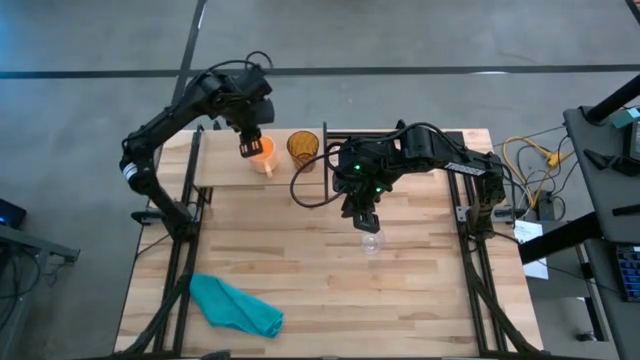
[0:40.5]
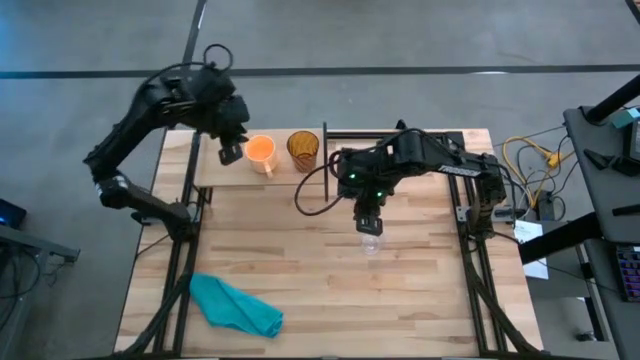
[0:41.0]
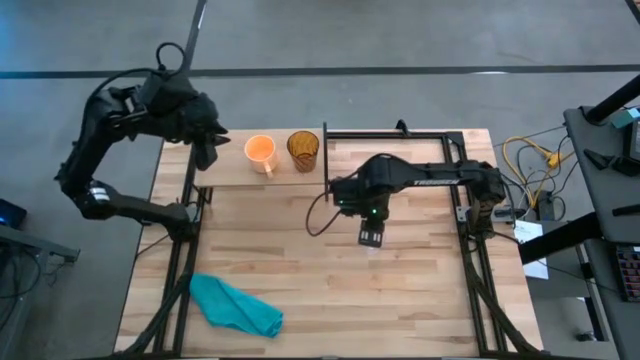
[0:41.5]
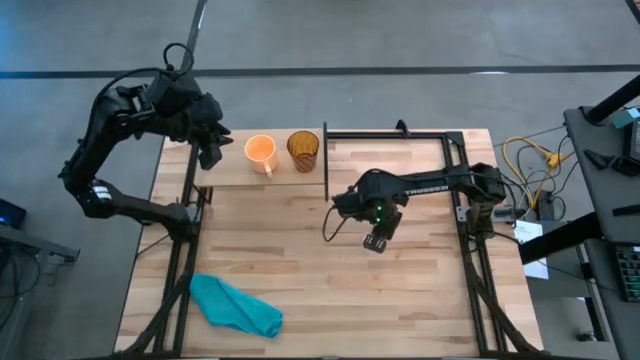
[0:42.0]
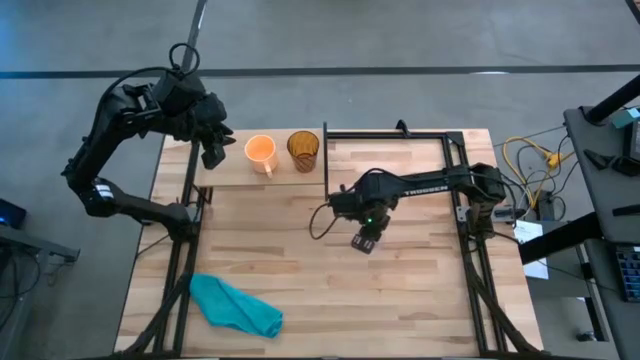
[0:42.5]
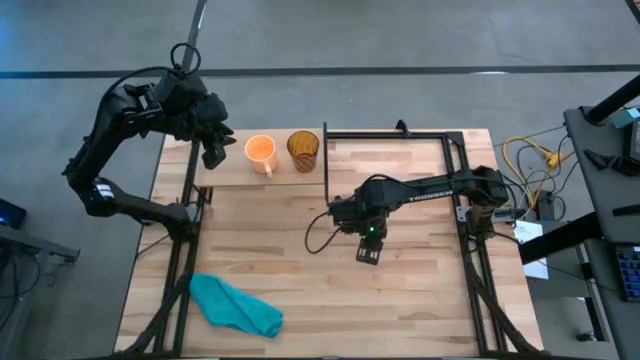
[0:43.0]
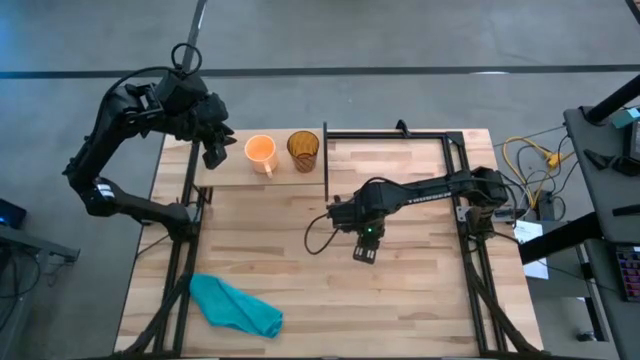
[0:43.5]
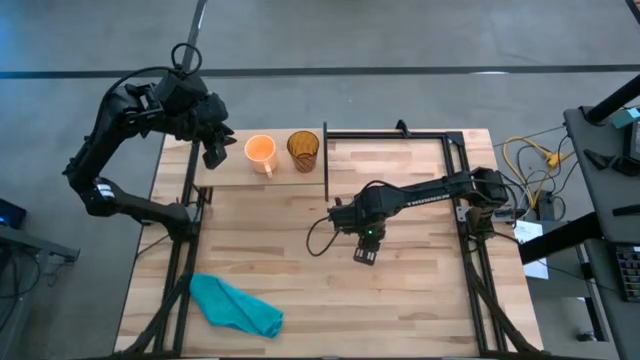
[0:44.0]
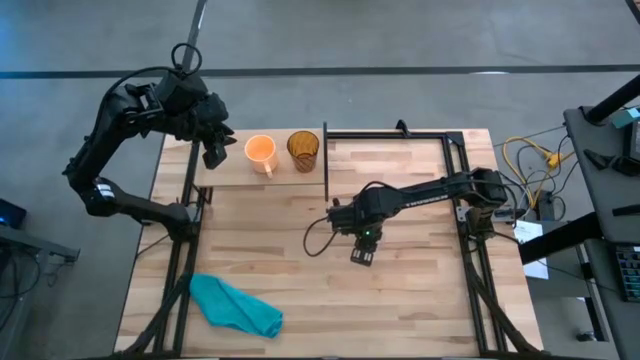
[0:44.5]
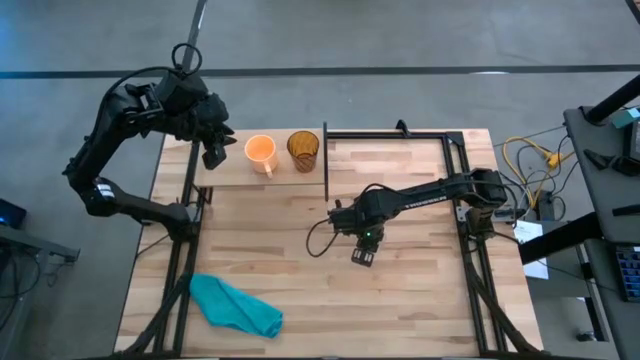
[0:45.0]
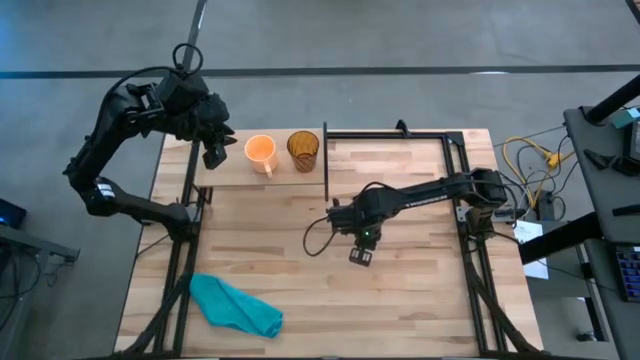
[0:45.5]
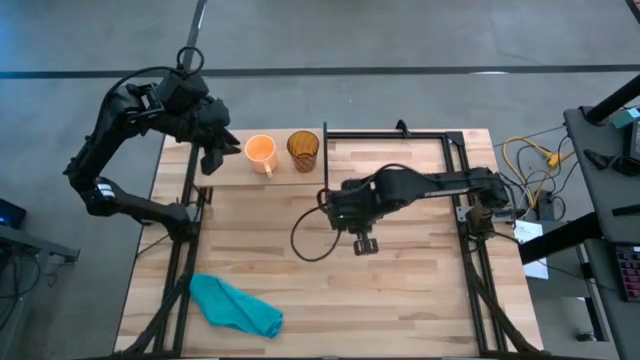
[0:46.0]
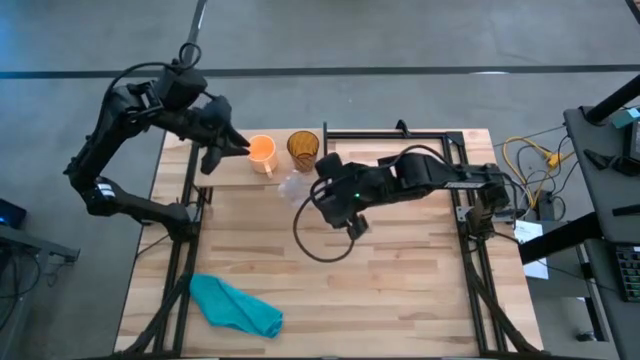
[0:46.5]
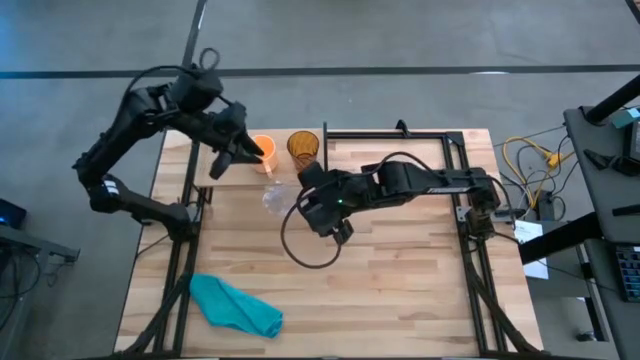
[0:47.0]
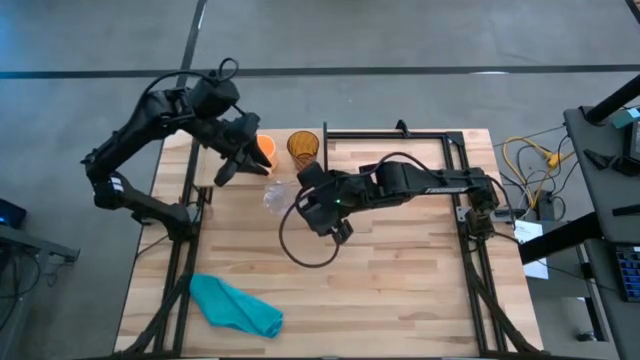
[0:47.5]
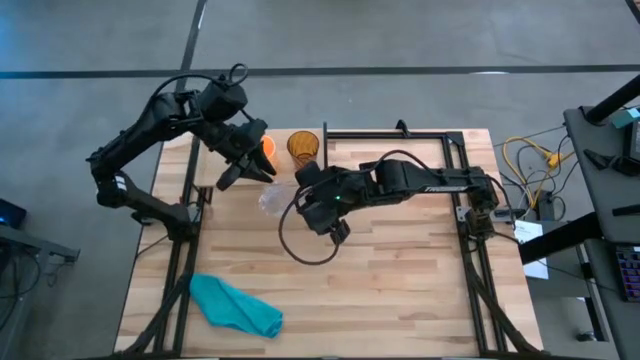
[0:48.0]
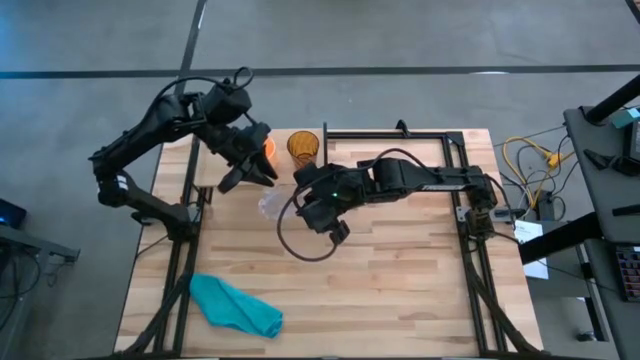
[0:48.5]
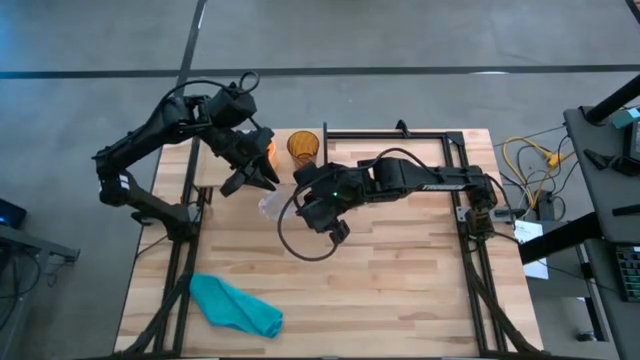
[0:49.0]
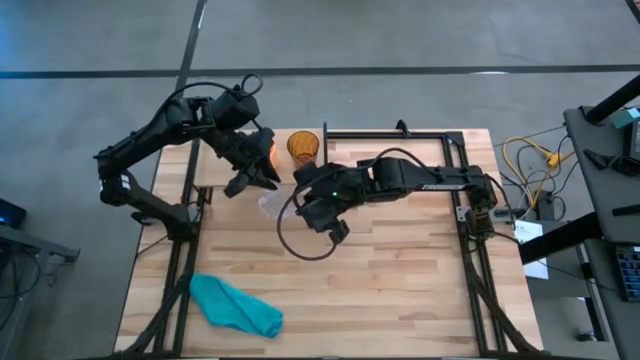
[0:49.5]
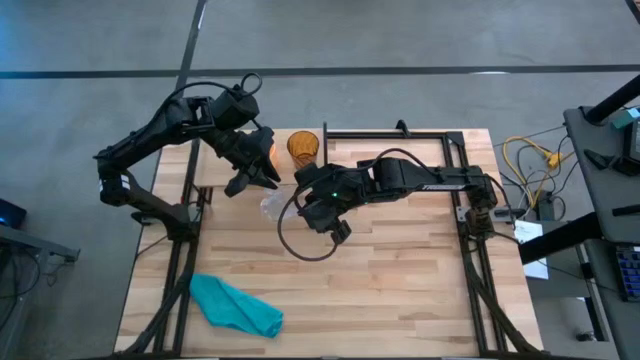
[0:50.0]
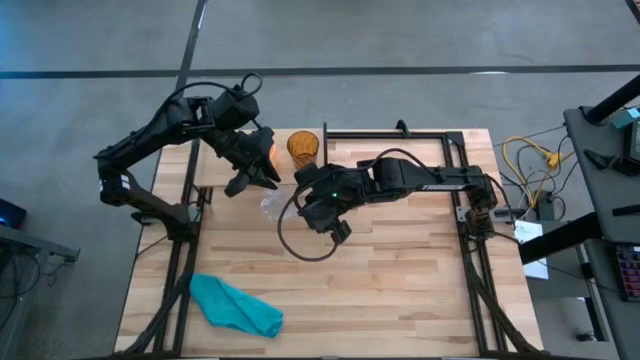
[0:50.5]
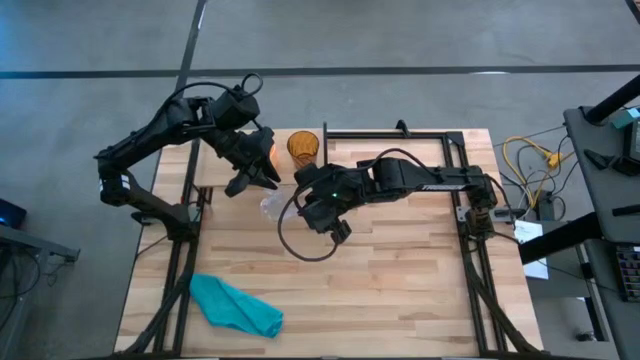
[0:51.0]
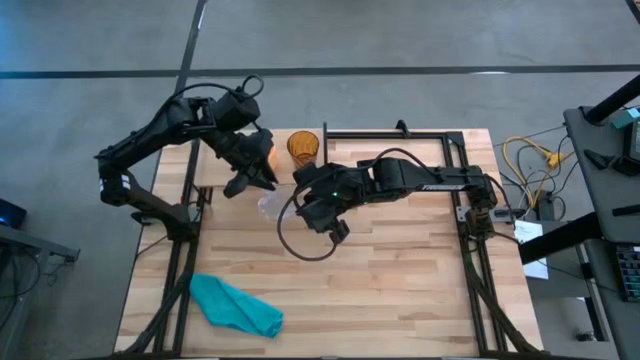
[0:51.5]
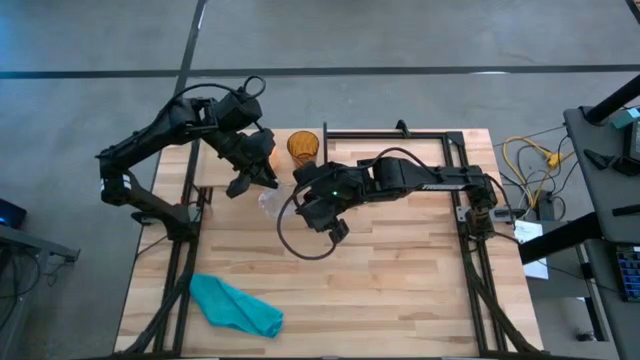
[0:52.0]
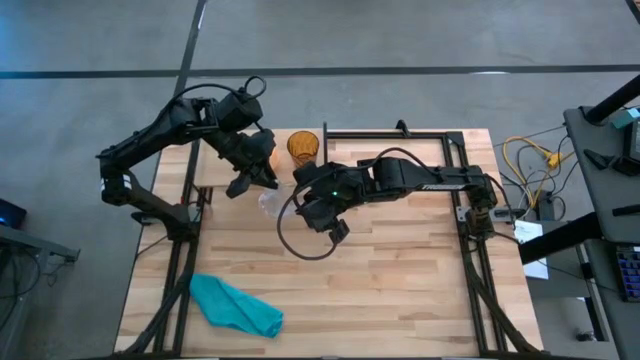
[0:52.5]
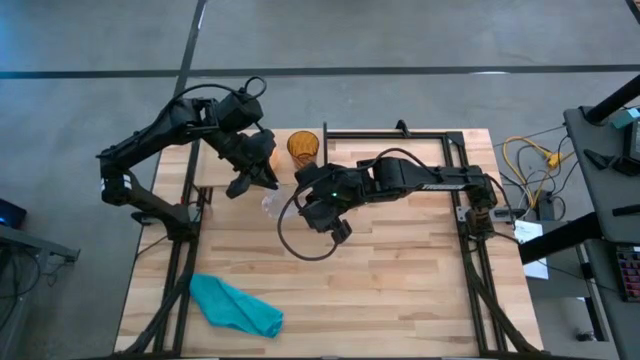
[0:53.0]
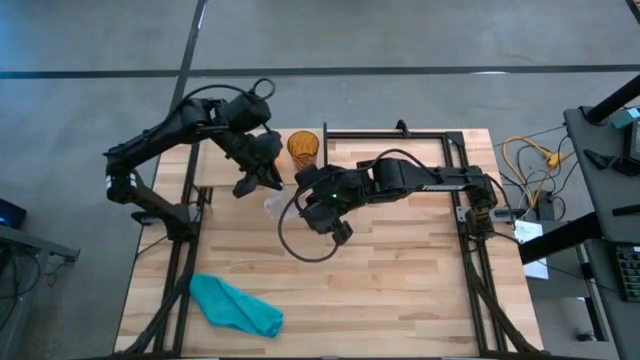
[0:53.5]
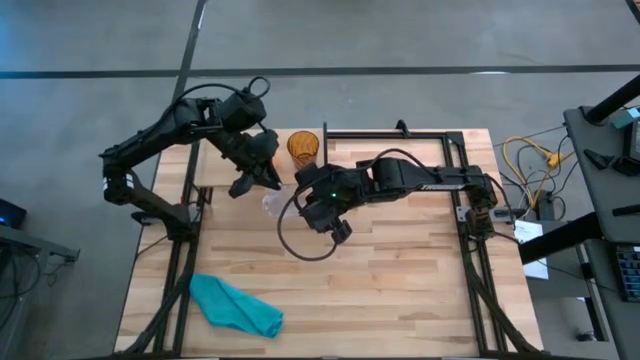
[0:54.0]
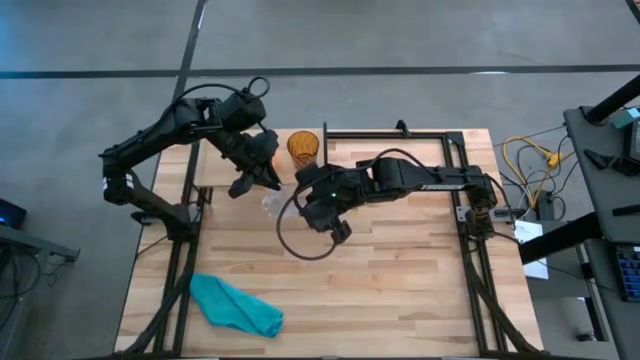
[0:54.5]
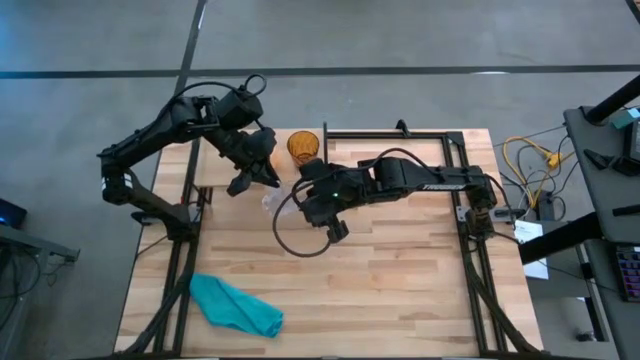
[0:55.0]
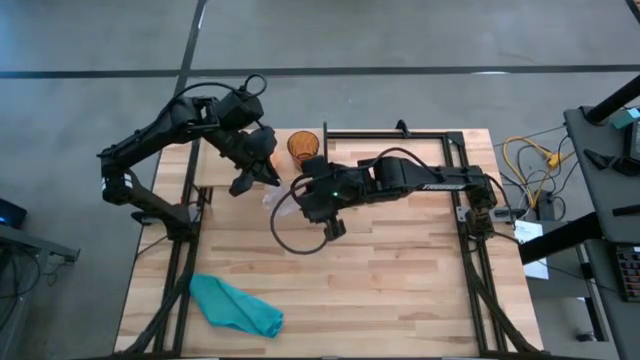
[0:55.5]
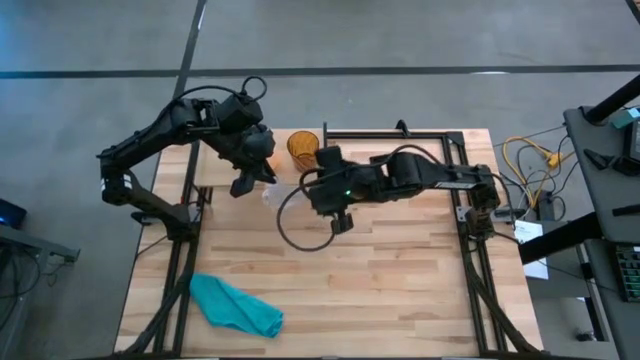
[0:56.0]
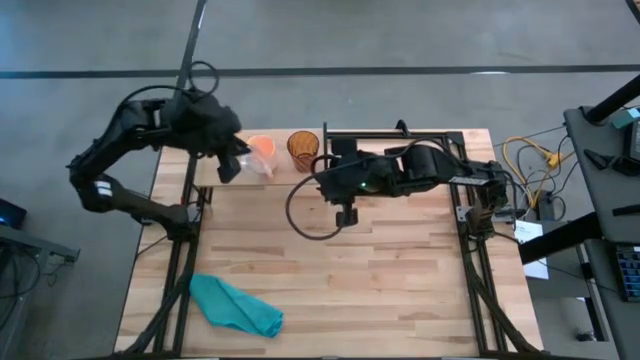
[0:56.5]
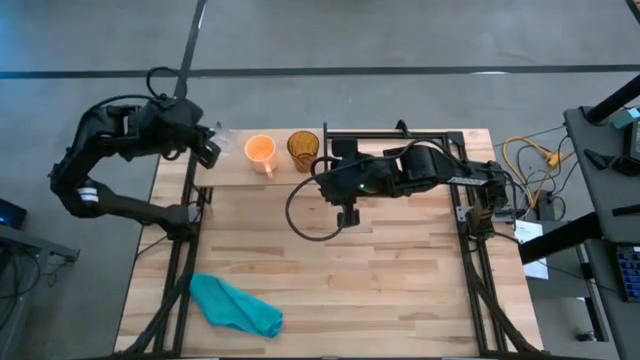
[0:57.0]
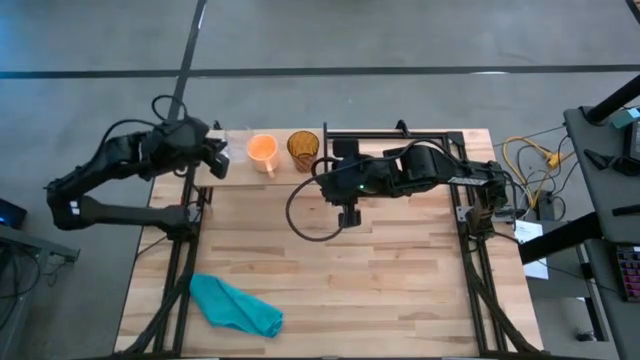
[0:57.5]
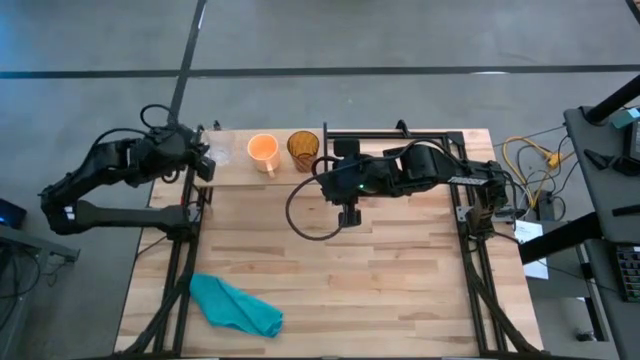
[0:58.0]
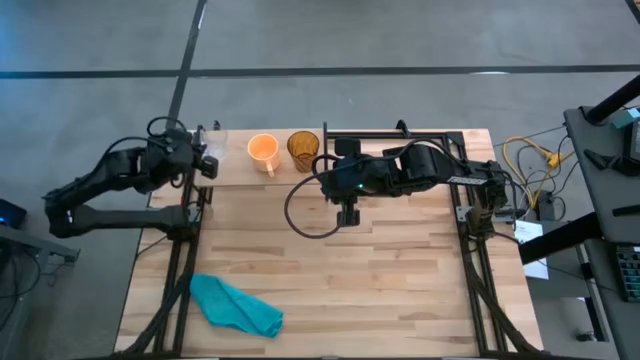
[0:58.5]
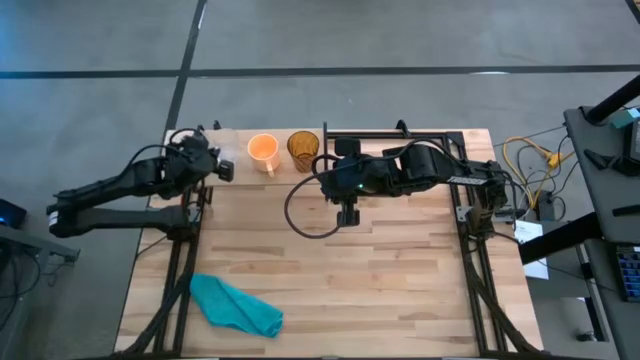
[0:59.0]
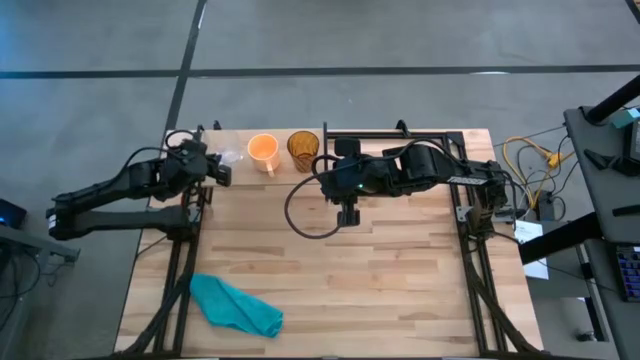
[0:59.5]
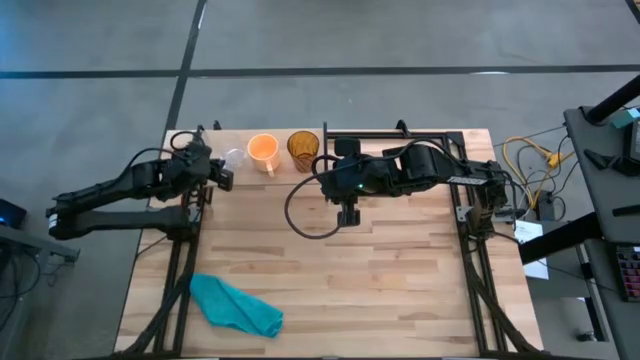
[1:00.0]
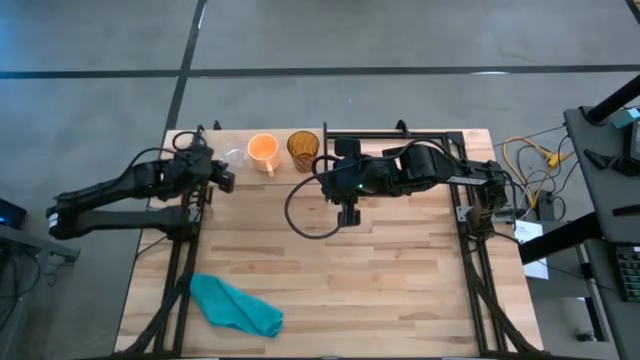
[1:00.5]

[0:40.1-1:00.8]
Task: Stack small to large cups/mugs on shelf
Put the transparent mug on the shelf

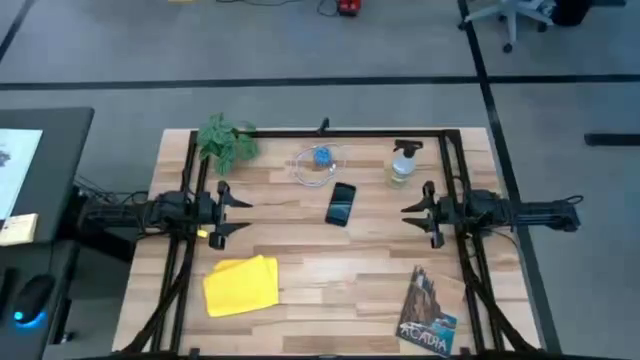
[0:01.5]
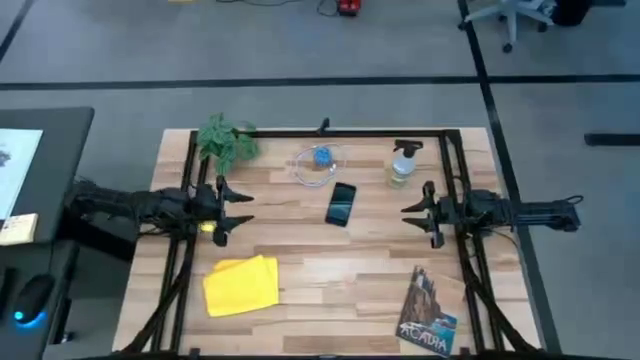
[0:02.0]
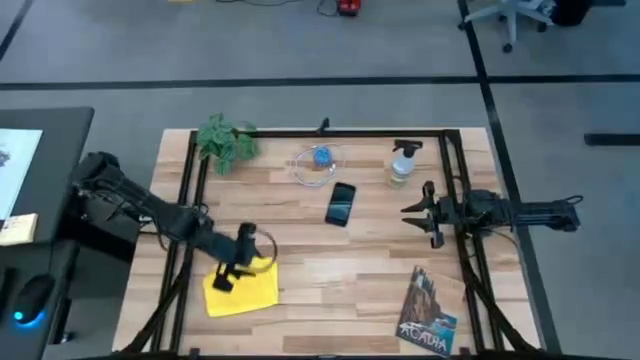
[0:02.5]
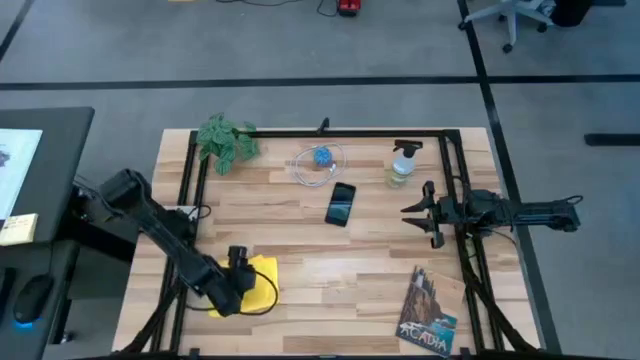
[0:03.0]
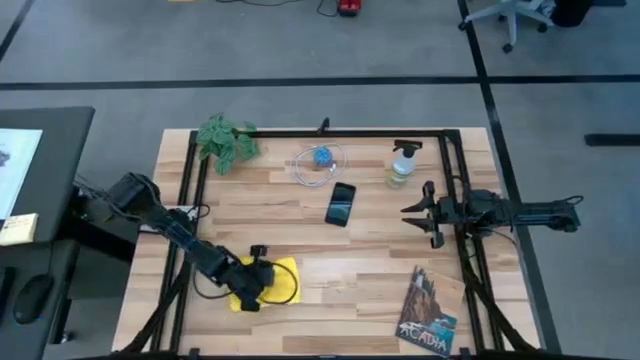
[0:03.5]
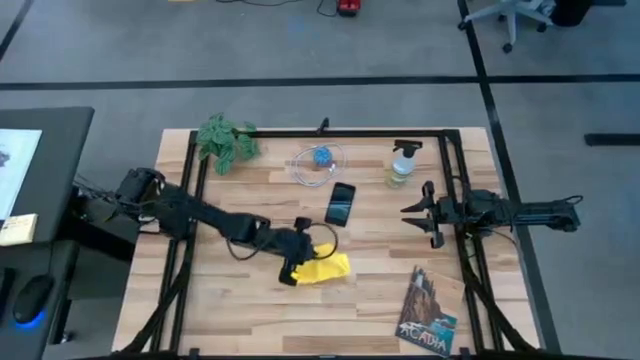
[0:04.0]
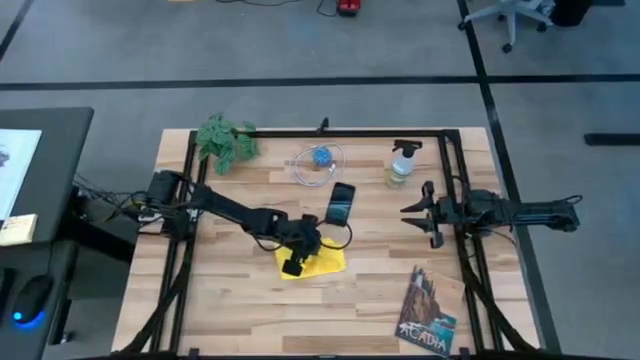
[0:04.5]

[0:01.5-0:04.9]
Task: Apply microfiber cloth
Move the yellow microfiber cloth to the center
